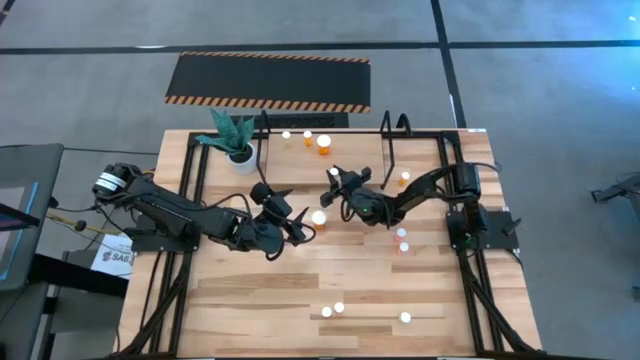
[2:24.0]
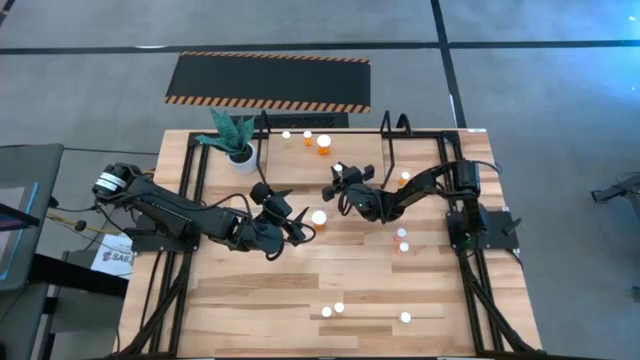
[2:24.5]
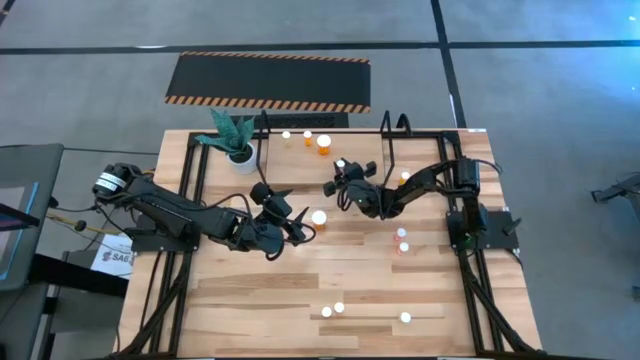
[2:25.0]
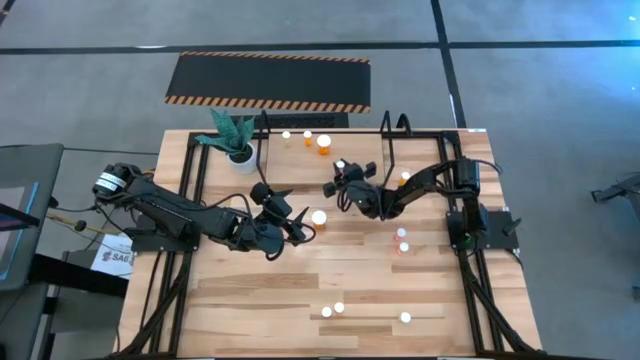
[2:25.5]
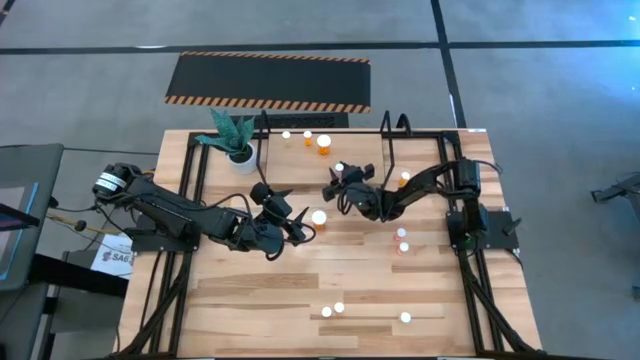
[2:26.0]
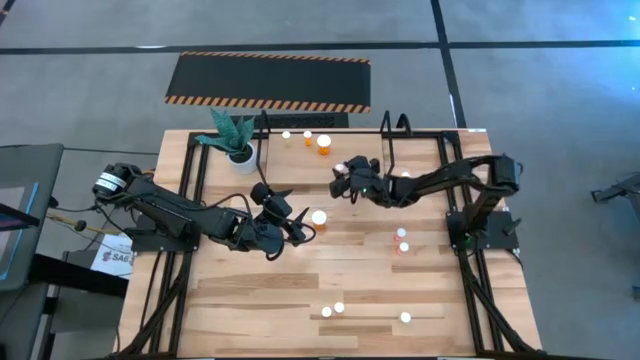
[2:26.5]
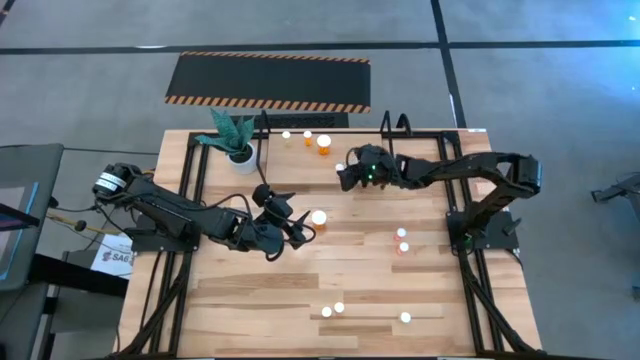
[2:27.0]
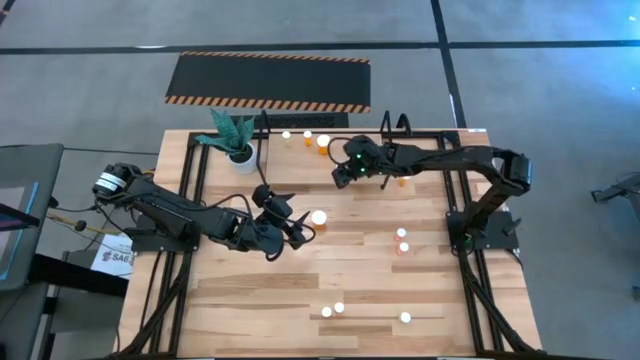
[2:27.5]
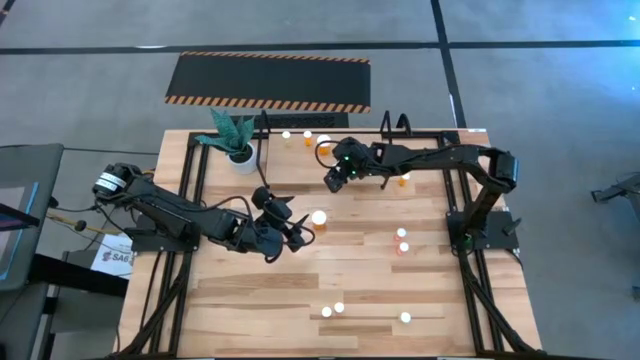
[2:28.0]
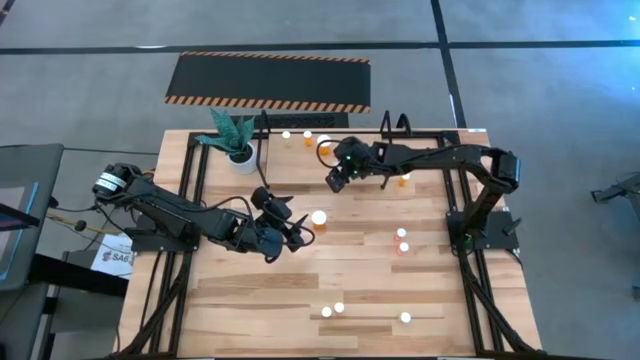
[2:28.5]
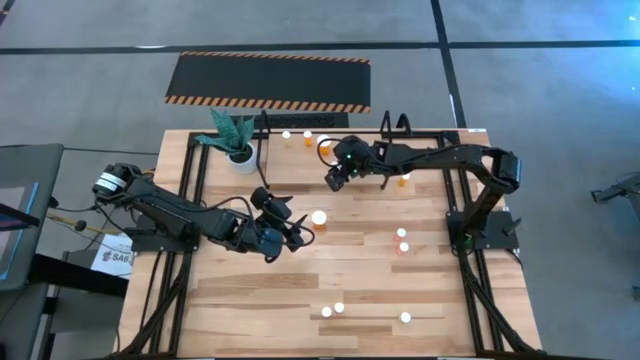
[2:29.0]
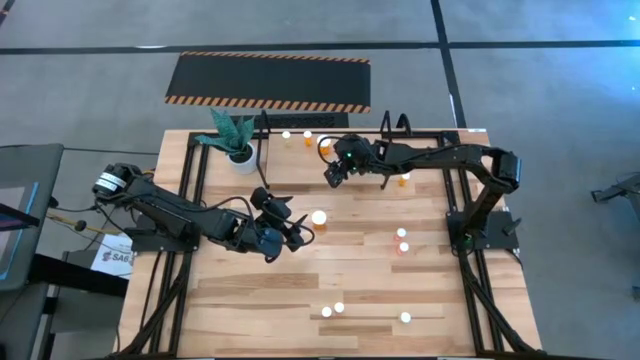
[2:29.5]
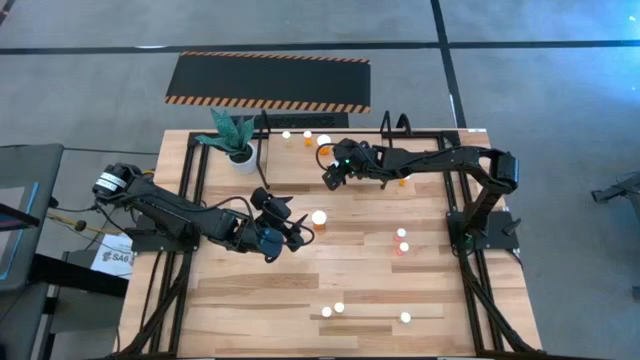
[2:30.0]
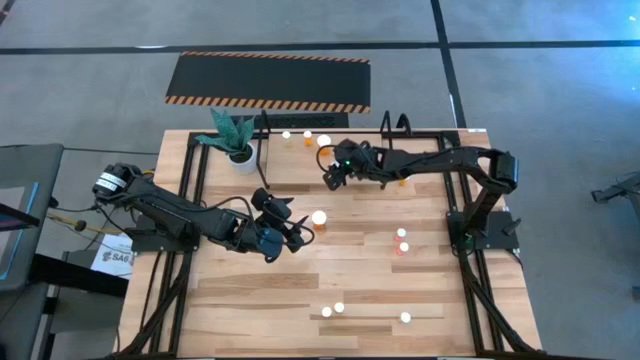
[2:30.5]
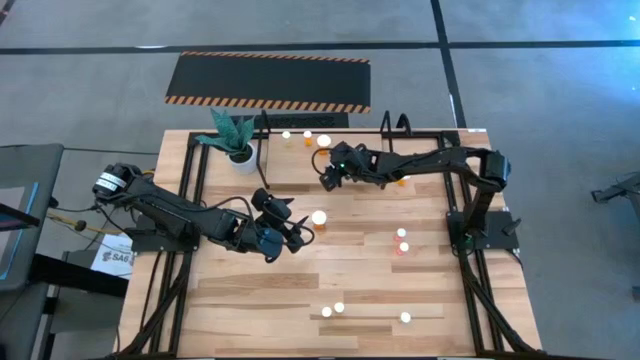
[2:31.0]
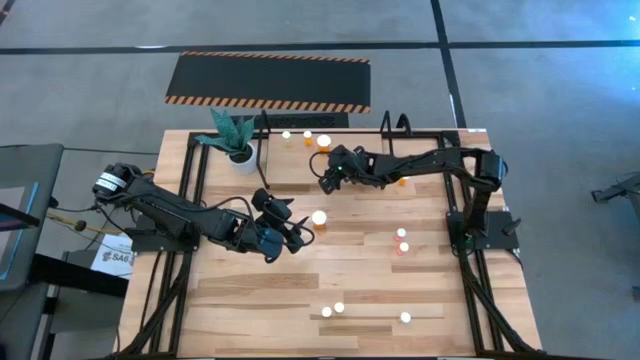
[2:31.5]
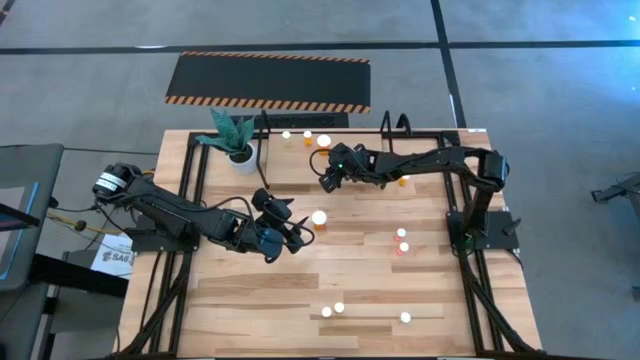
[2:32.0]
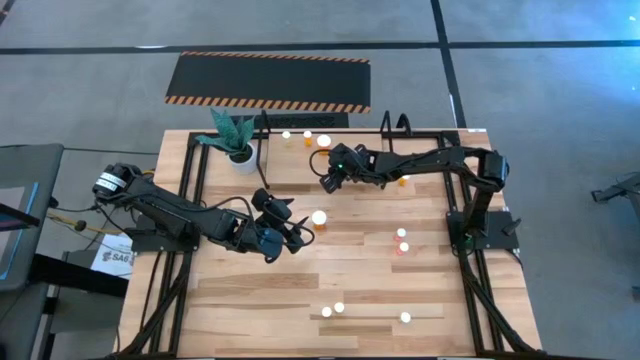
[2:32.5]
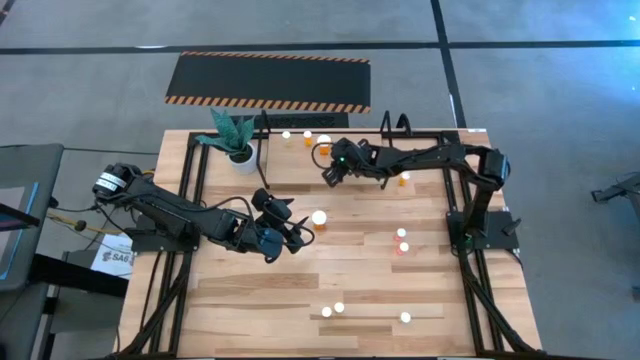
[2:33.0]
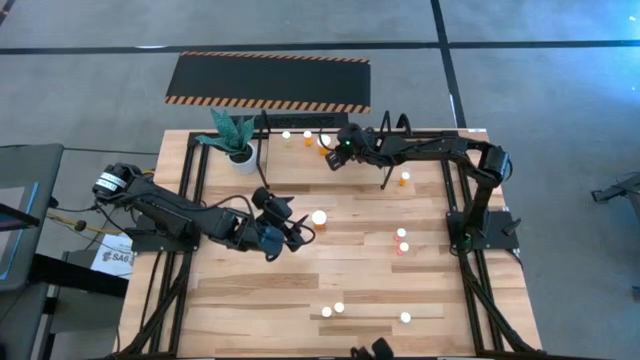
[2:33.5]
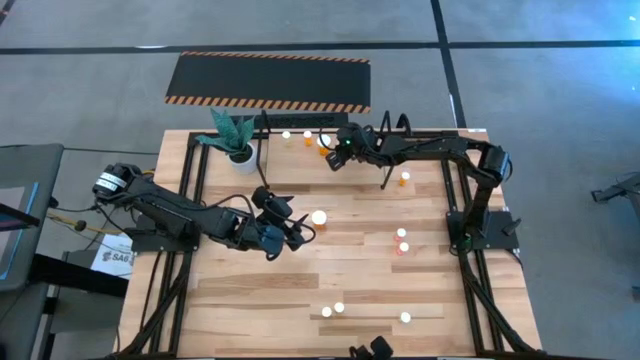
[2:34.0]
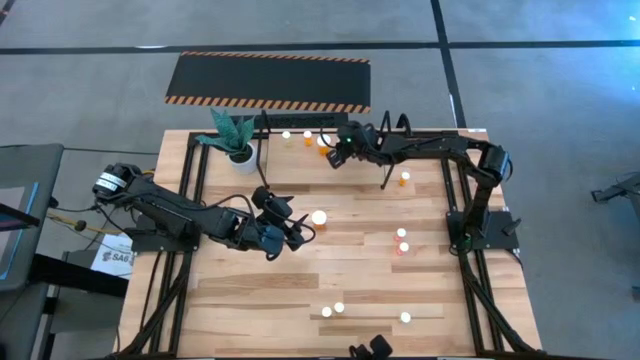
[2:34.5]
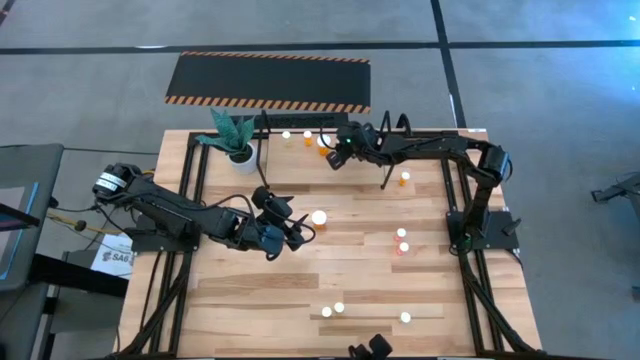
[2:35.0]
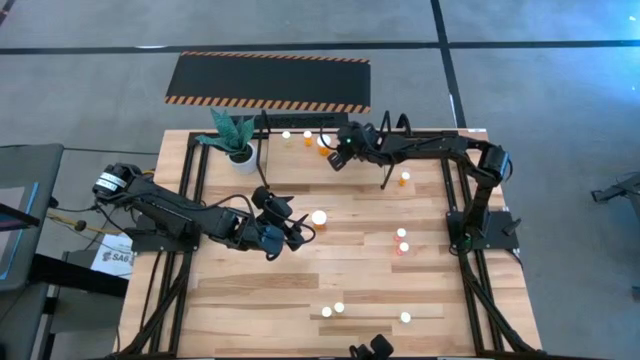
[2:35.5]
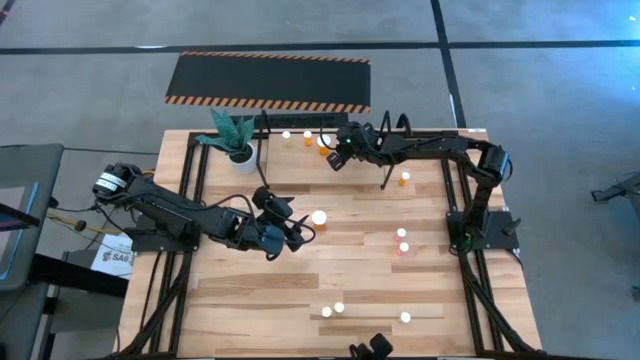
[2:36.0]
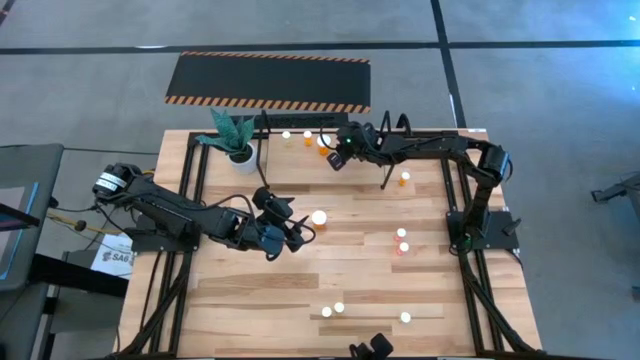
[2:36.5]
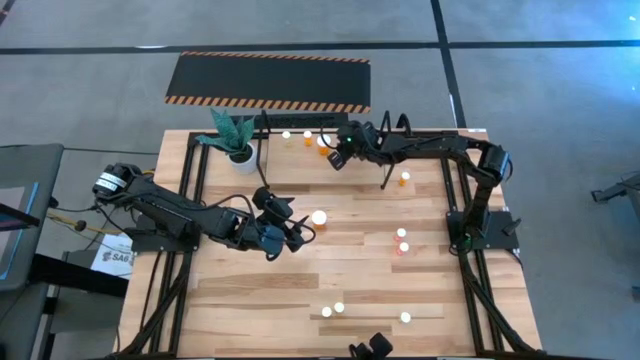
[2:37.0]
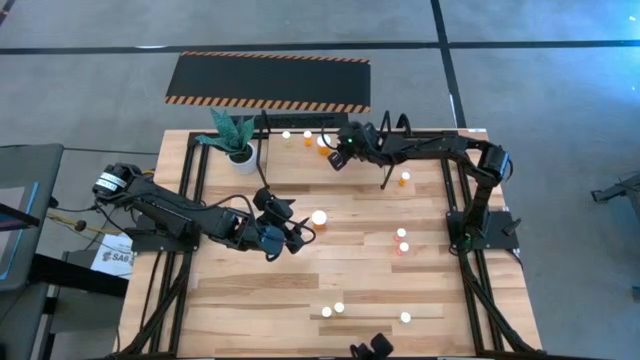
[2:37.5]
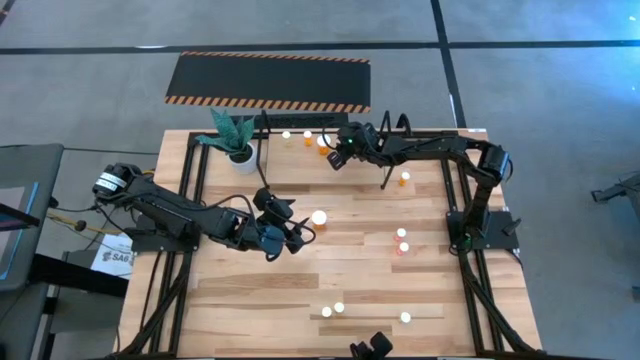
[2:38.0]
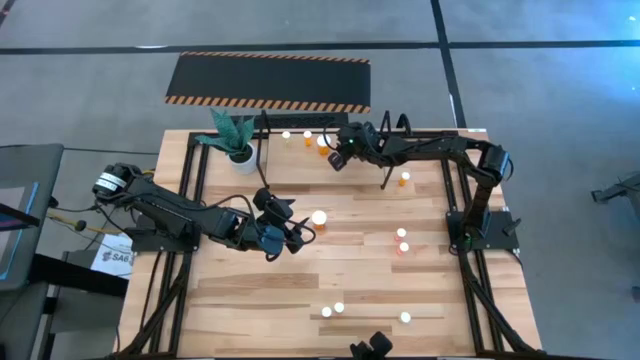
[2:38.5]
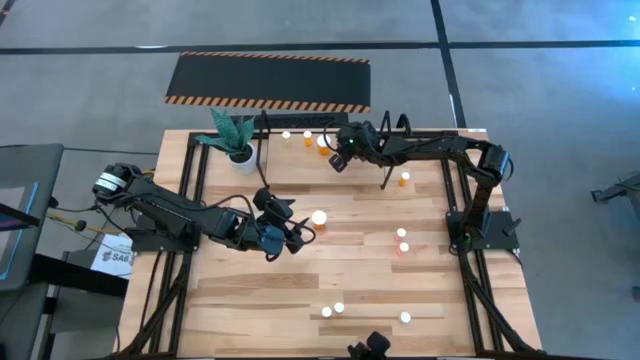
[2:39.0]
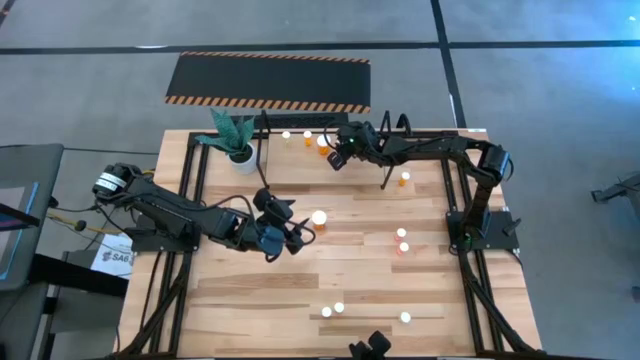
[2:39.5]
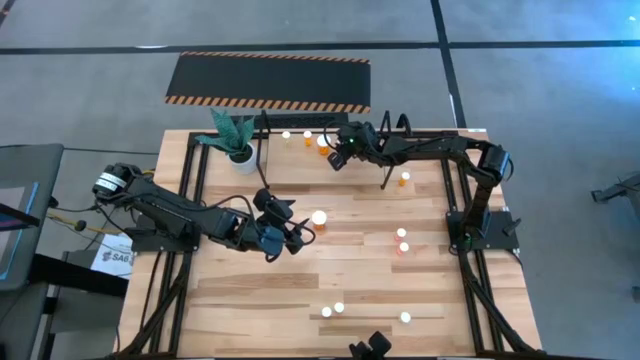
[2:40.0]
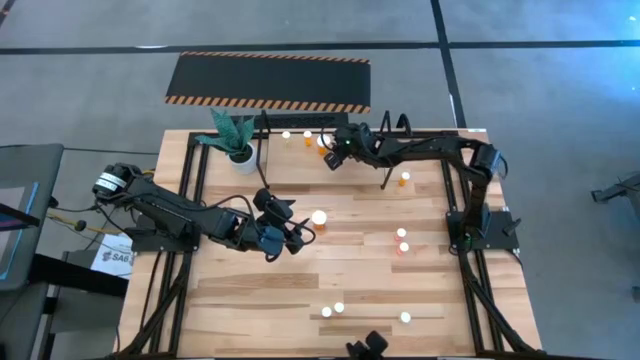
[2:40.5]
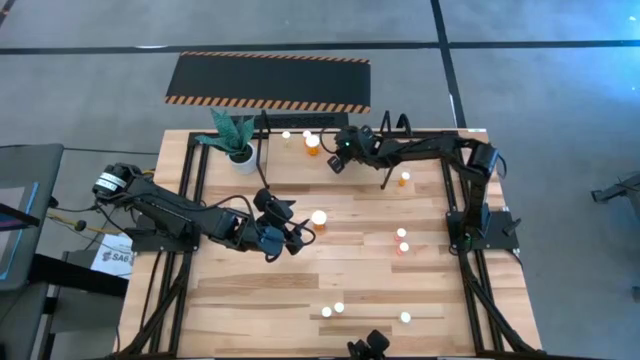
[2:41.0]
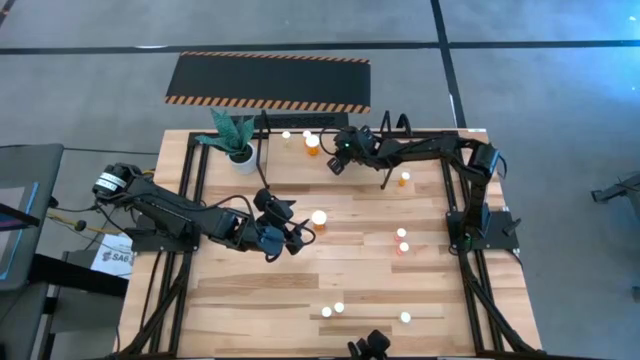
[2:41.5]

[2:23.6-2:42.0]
Task: Pick and place medicine bottles onto shelf by color
Put the bottom left pink pill bottle on the shelf
